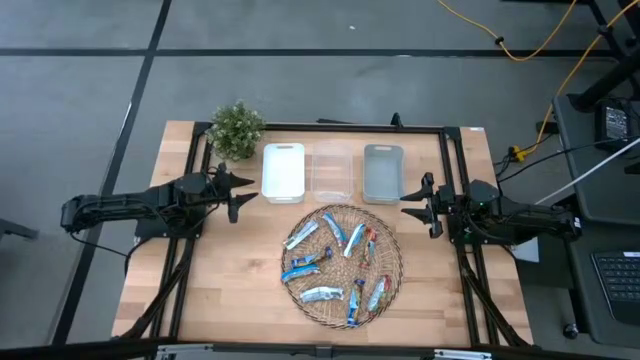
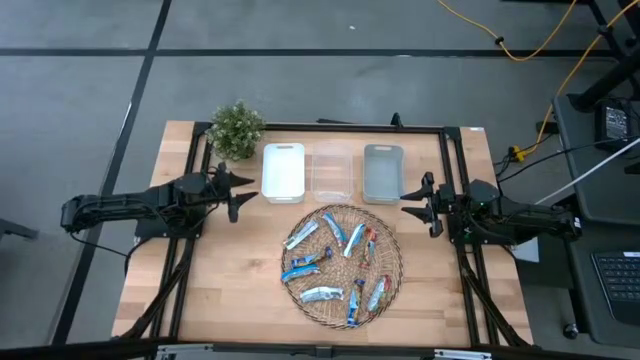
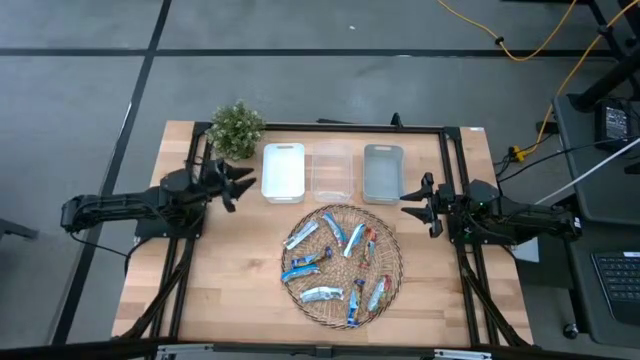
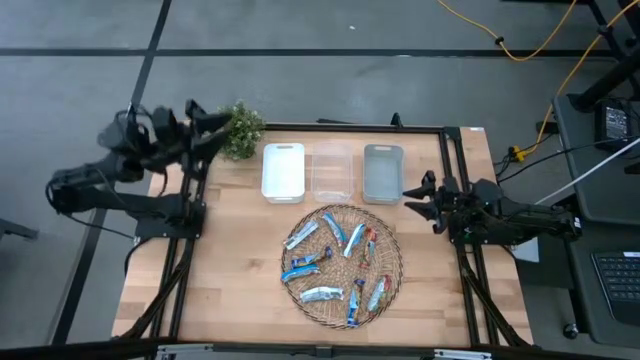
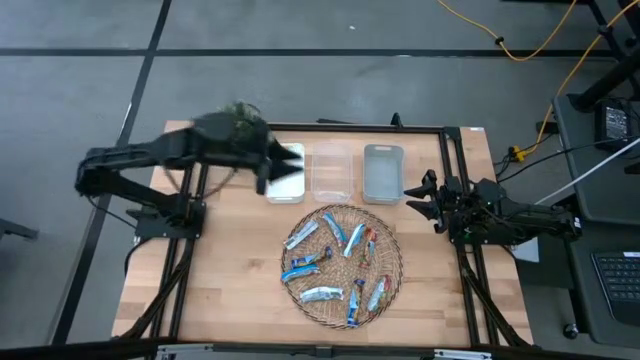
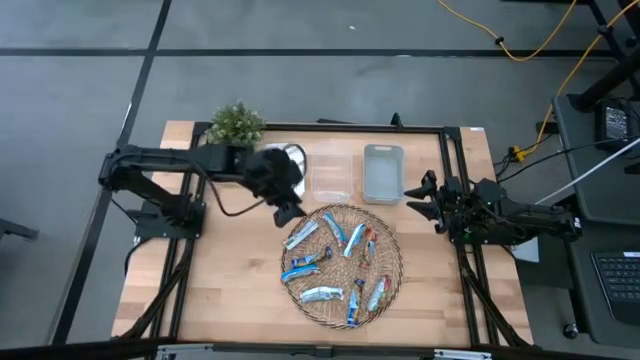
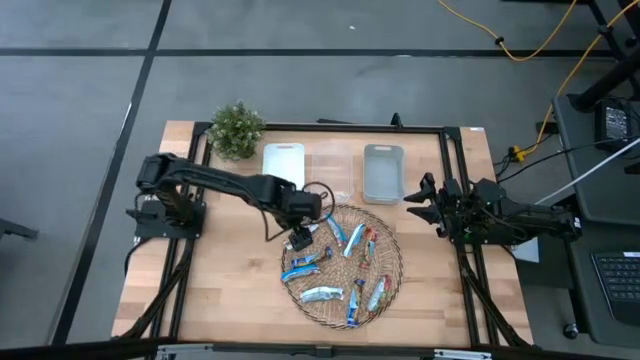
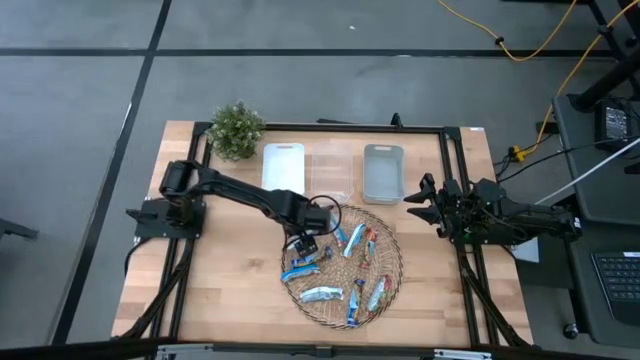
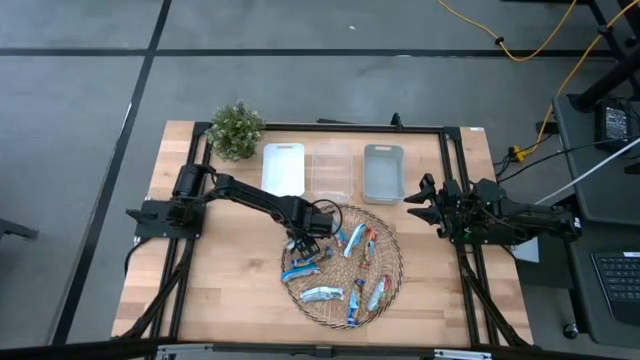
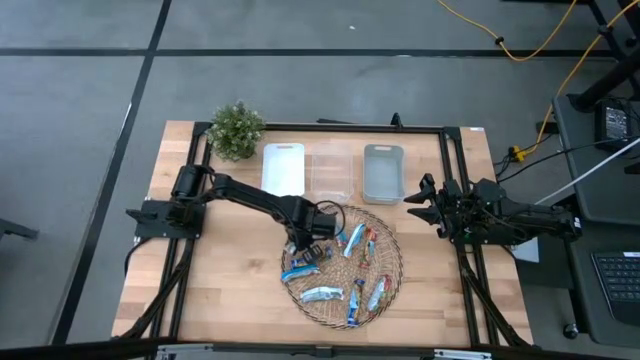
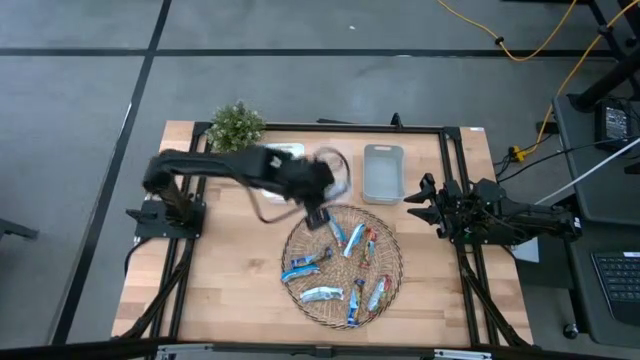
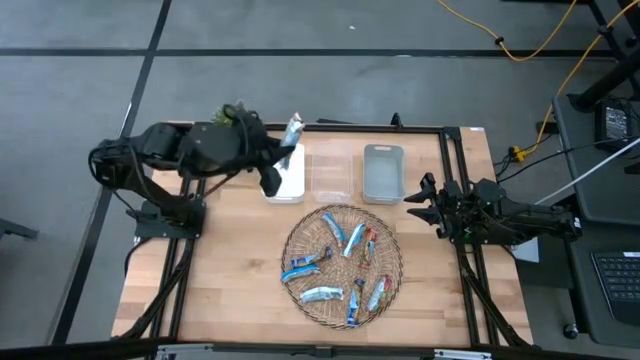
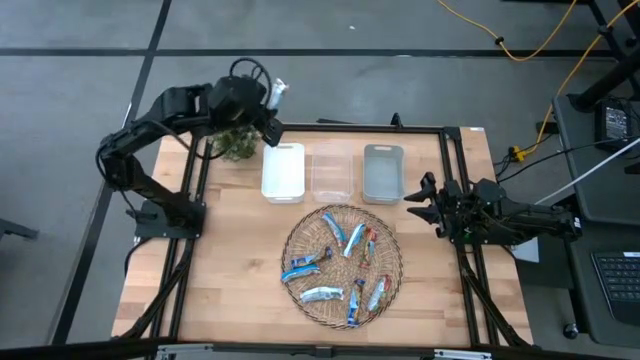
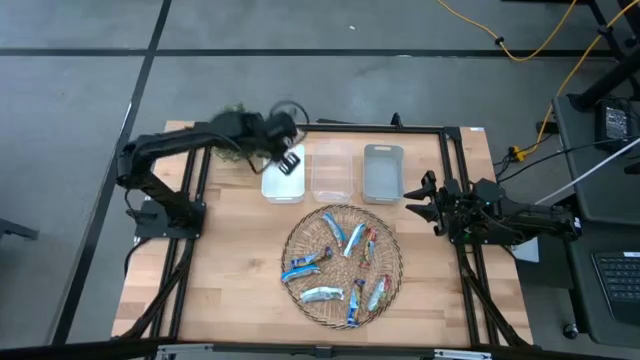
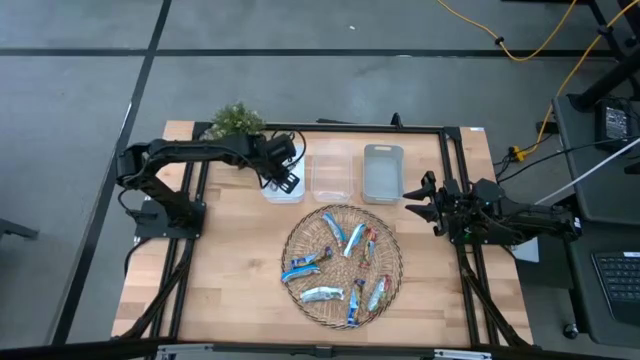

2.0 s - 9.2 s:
Task: Pick and place Granola Bars by type
Put the yellow granola bar into the white bin

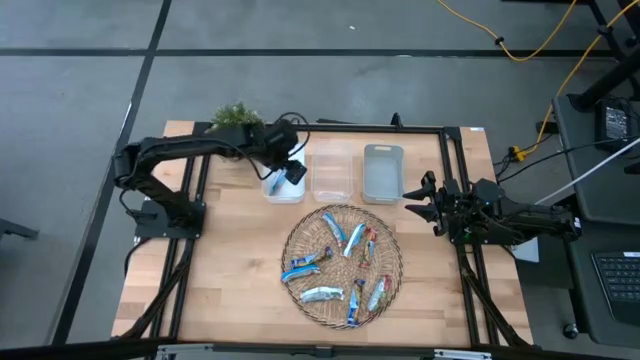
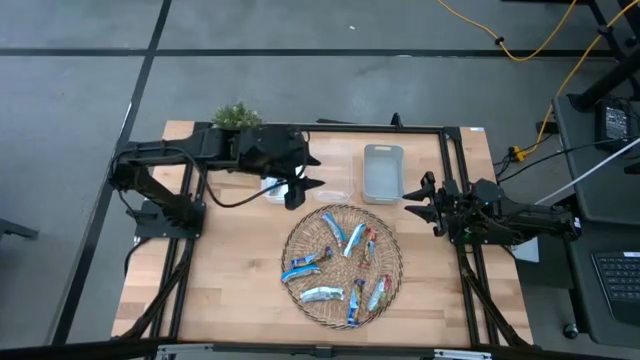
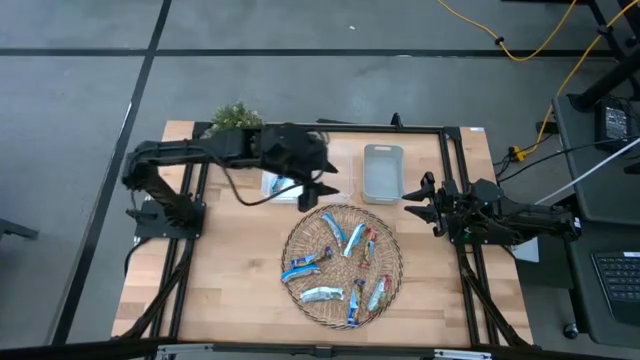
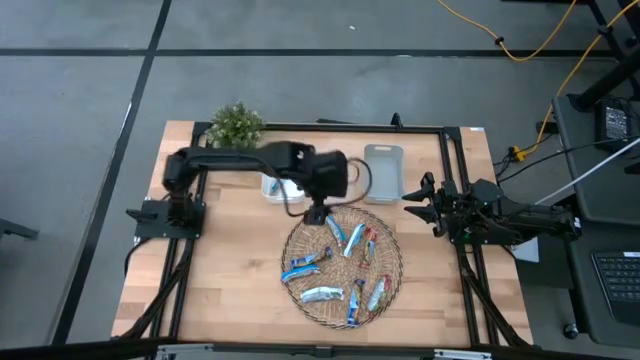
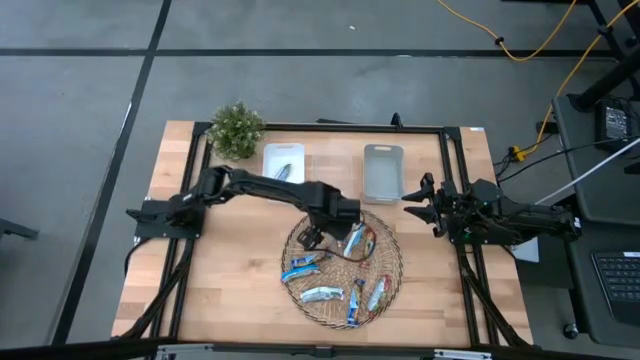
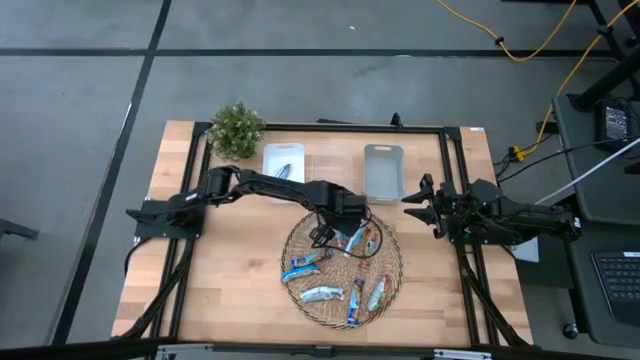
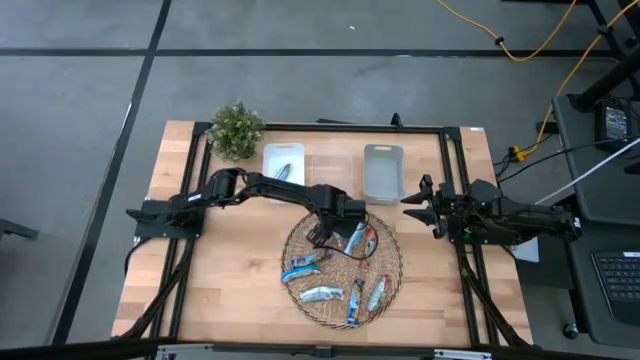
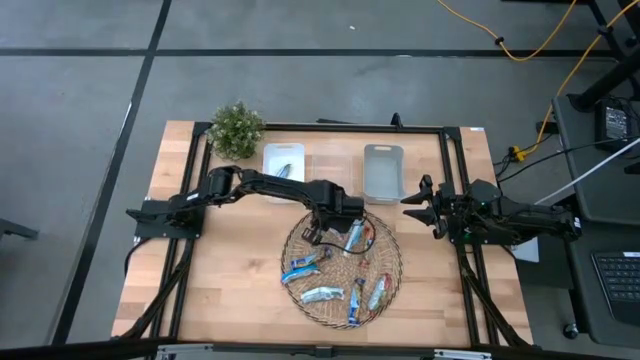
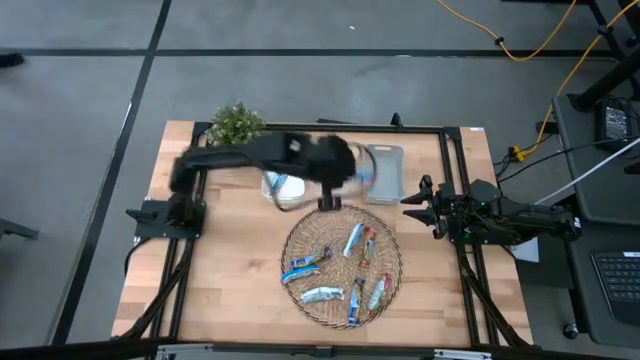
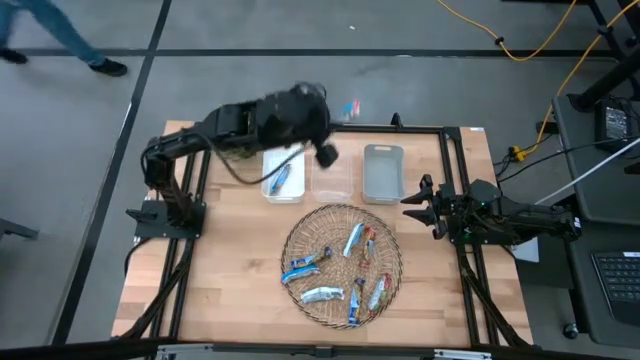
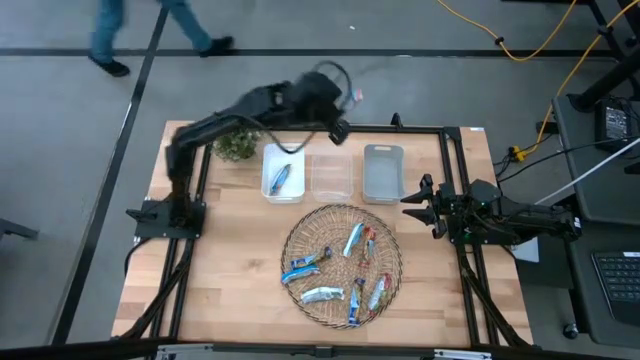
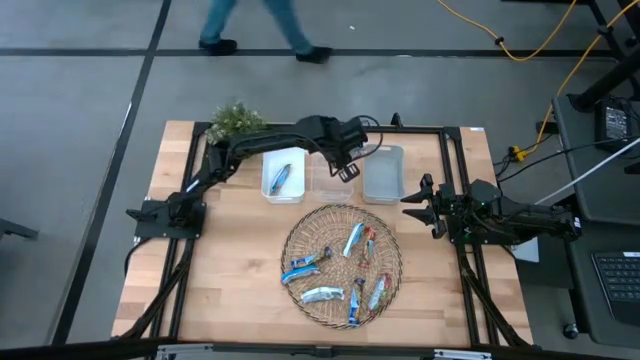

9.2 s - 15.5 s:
Put the red granola bar into the transparent bin

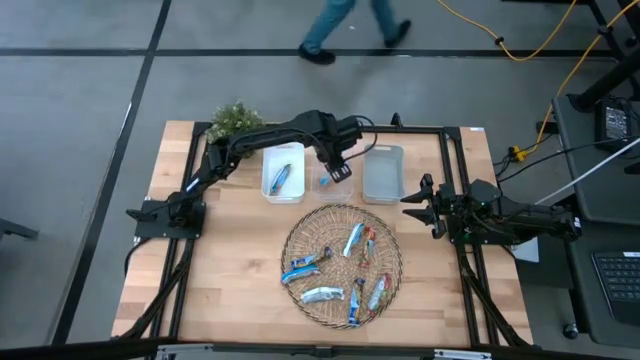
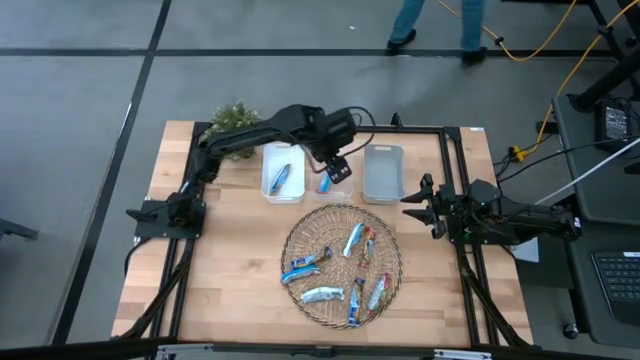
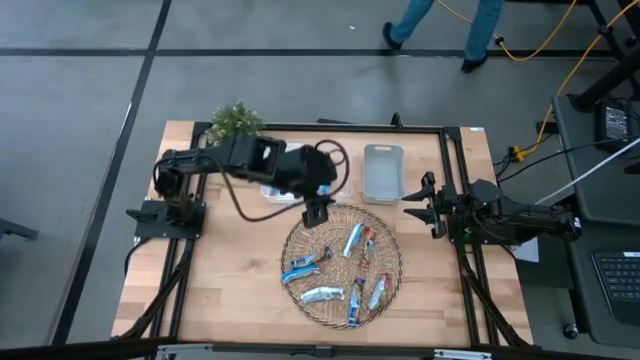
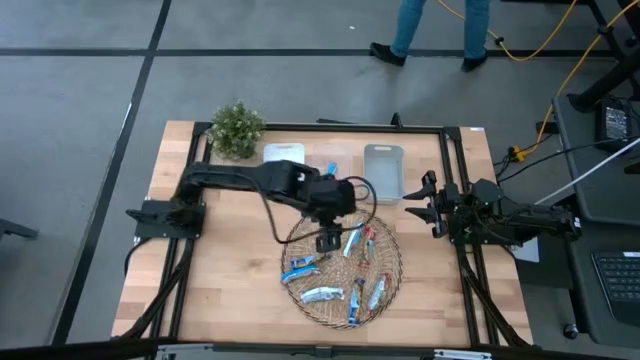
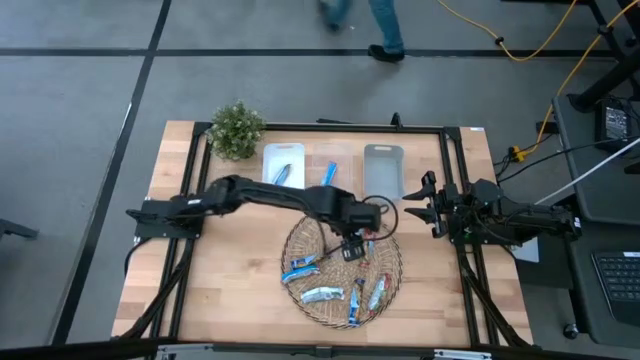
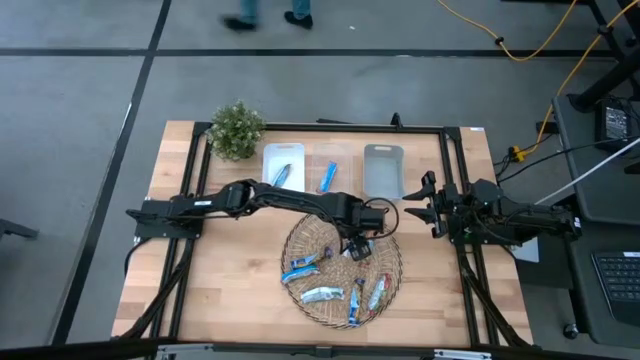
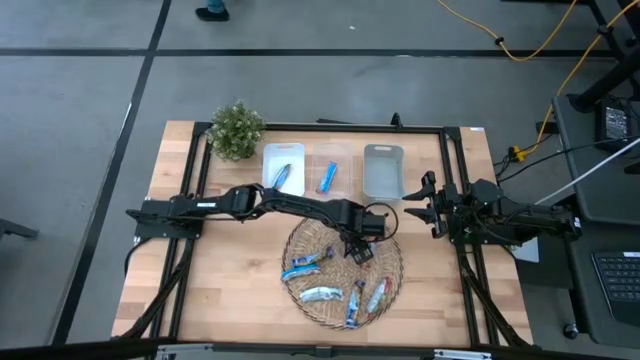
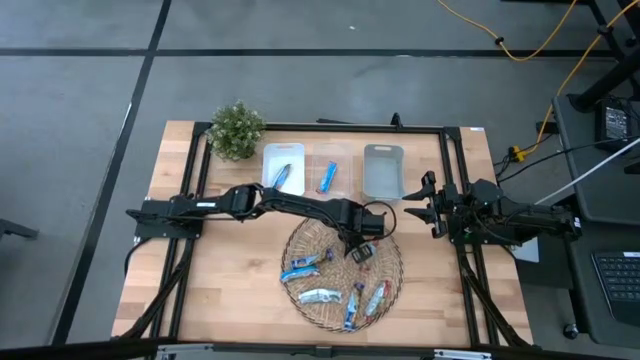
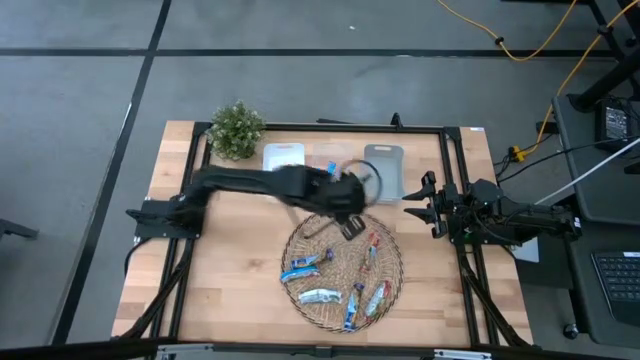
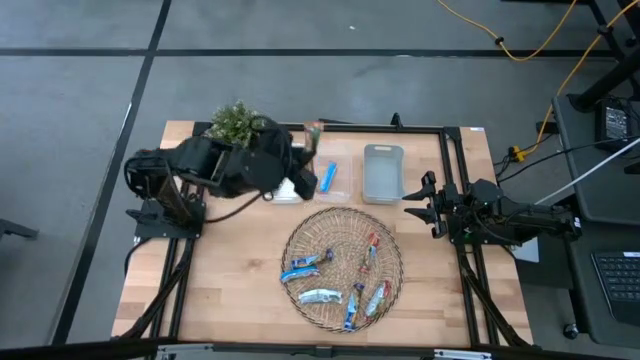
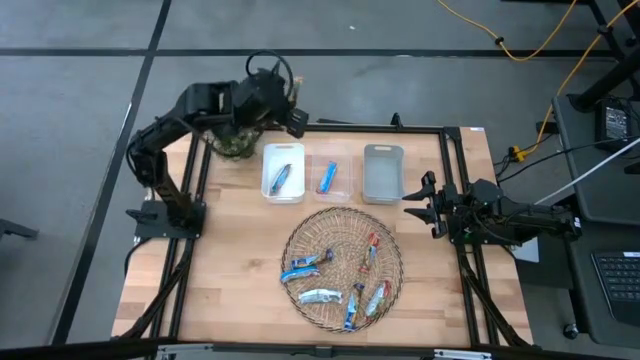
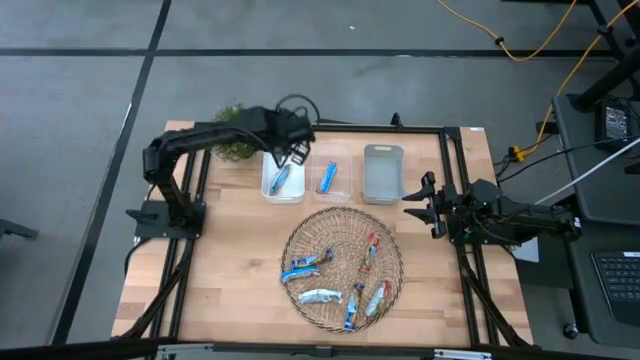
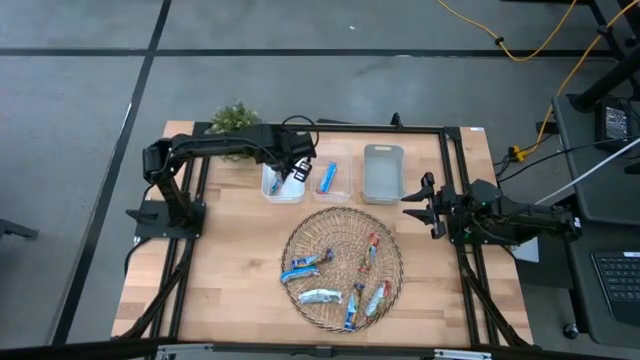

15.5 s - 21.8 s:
Put the yellow granola bar into the white bin

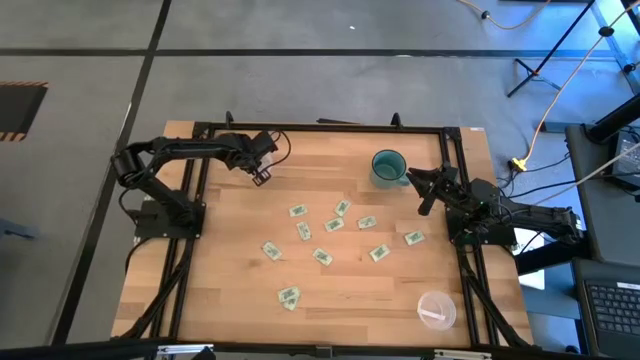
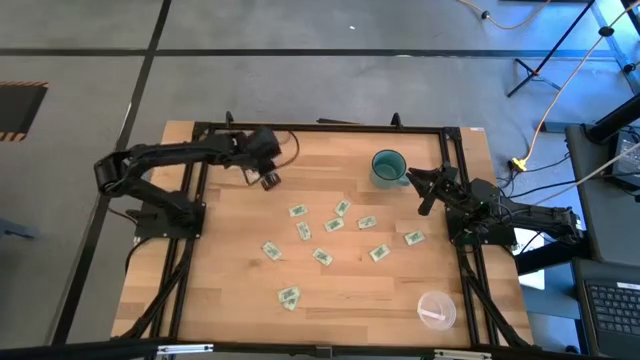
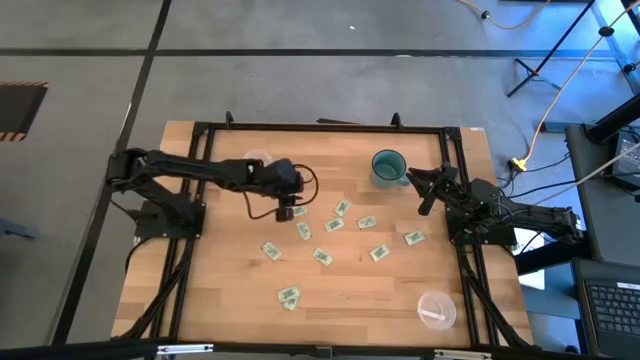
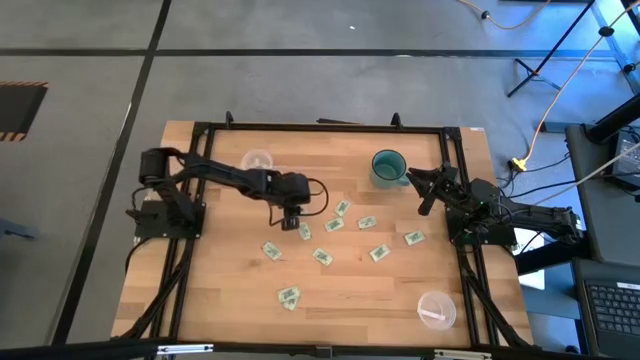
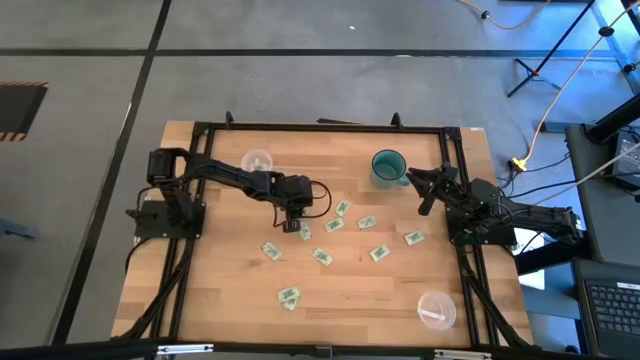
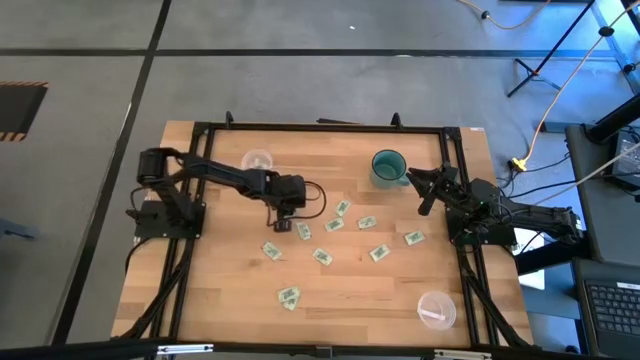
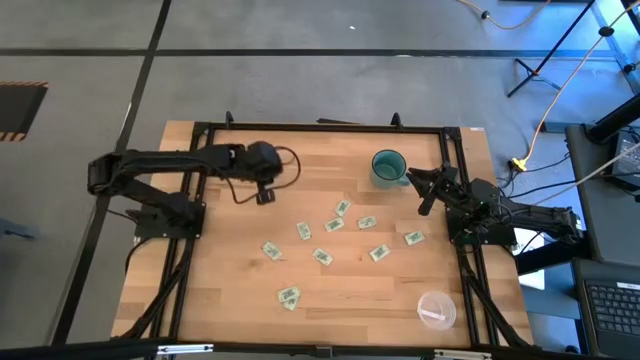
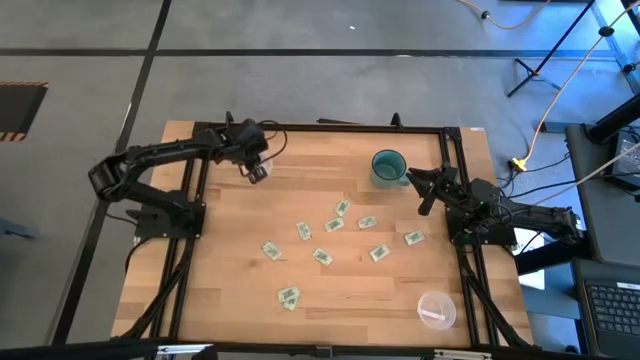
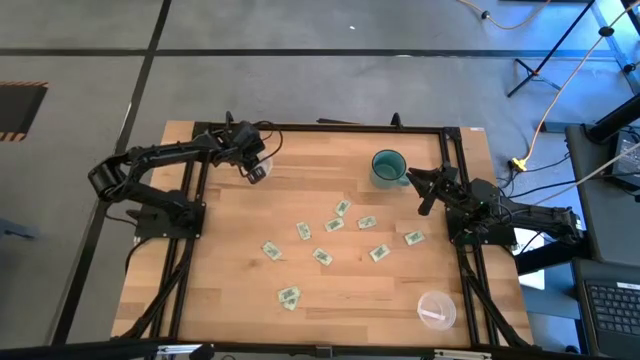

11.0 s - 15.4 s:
Task: Pick and place Stevia / Truvia into bins
Put the stevia packet into the top transparent container
